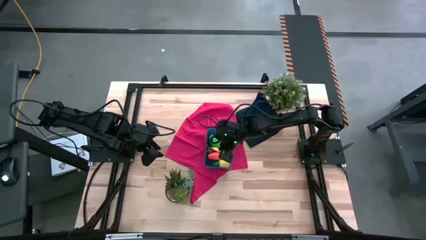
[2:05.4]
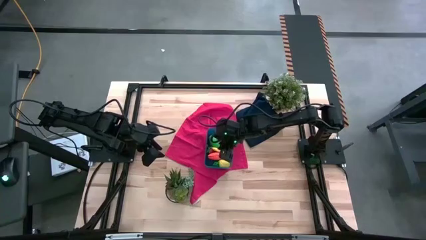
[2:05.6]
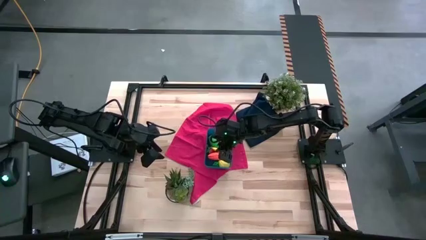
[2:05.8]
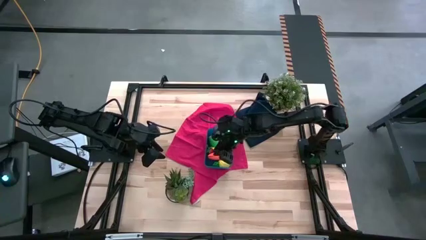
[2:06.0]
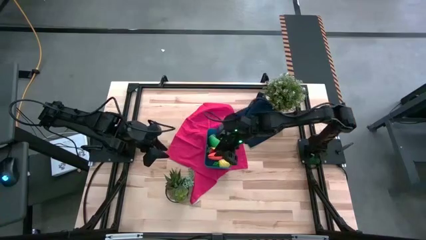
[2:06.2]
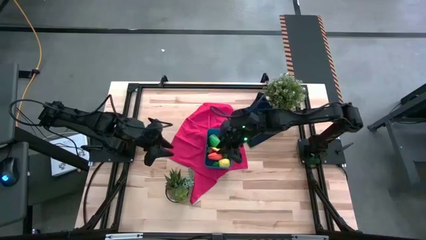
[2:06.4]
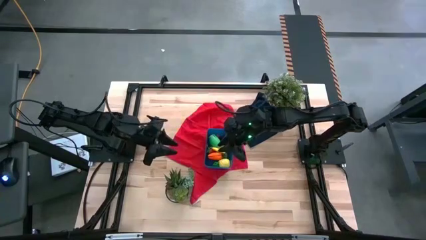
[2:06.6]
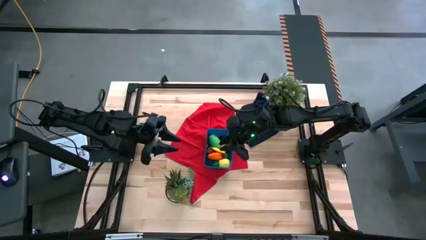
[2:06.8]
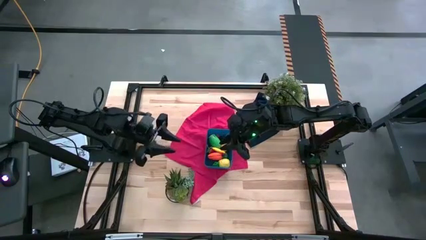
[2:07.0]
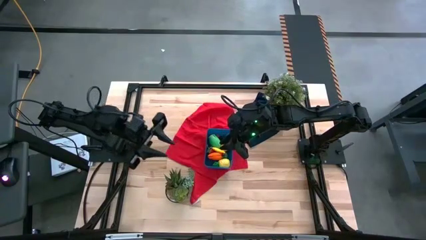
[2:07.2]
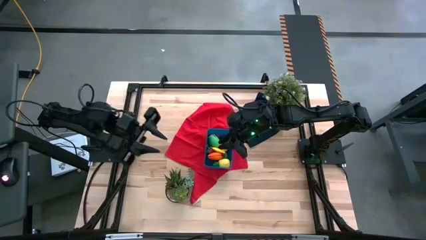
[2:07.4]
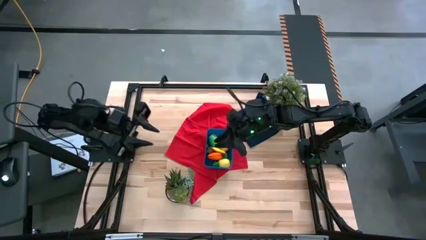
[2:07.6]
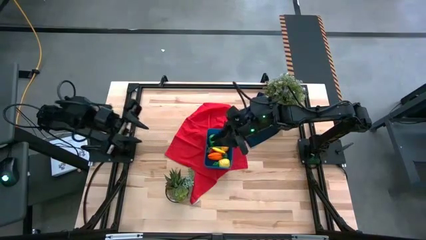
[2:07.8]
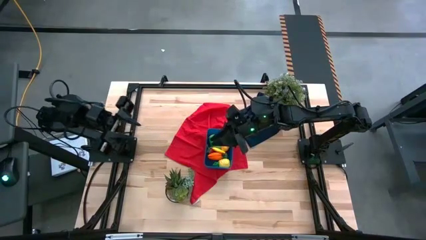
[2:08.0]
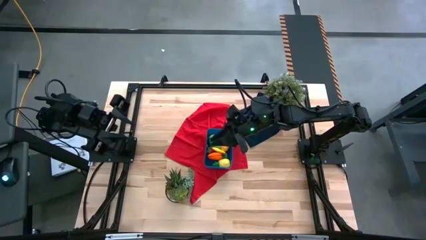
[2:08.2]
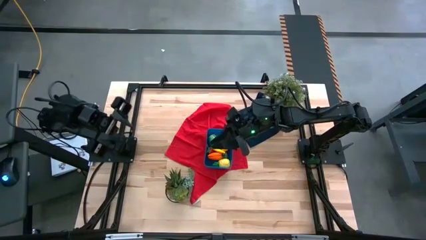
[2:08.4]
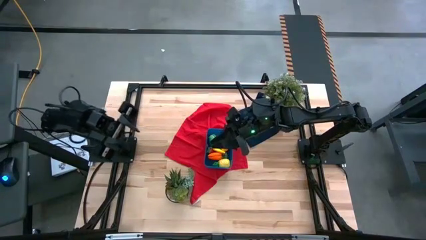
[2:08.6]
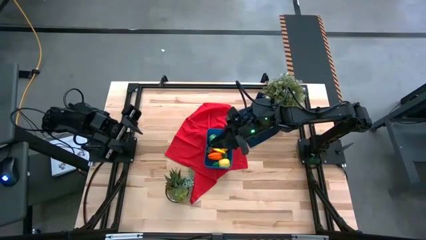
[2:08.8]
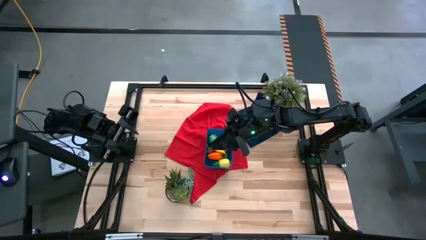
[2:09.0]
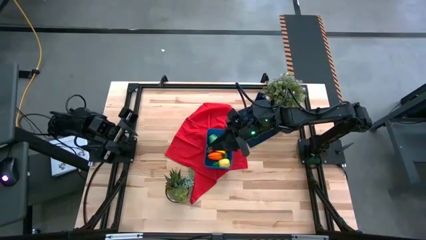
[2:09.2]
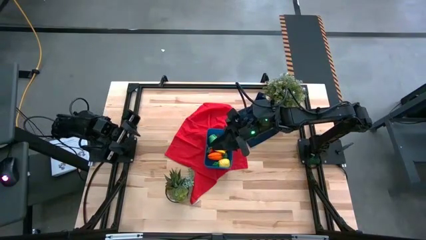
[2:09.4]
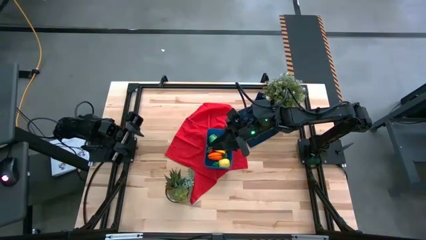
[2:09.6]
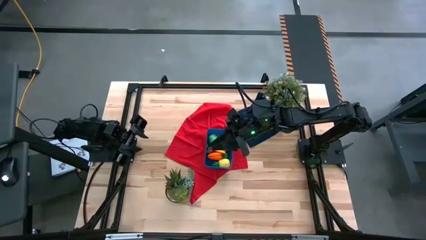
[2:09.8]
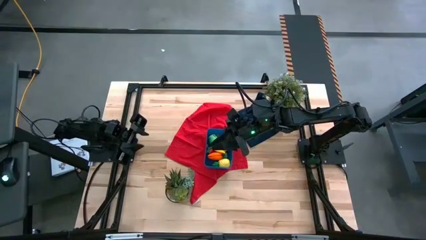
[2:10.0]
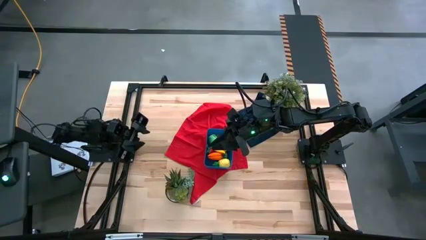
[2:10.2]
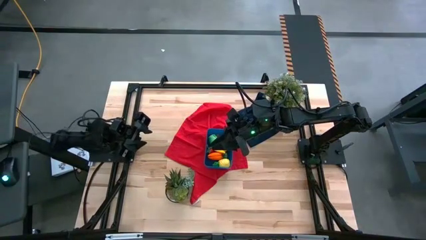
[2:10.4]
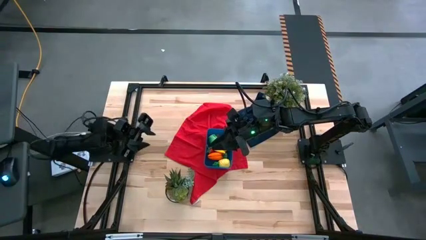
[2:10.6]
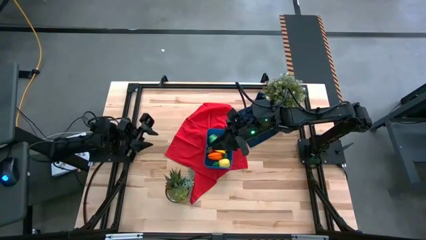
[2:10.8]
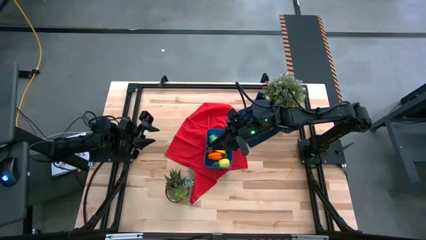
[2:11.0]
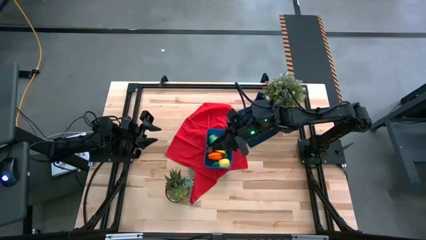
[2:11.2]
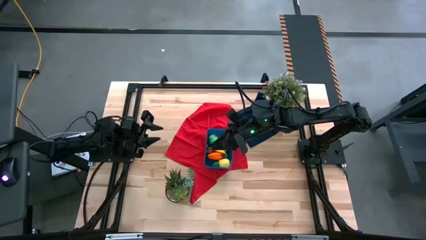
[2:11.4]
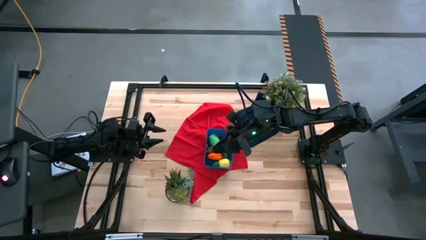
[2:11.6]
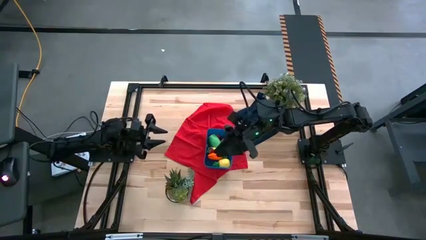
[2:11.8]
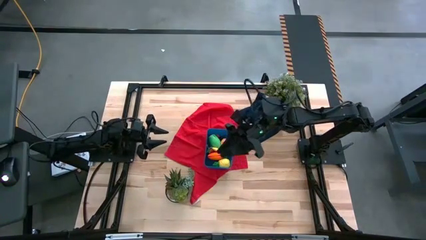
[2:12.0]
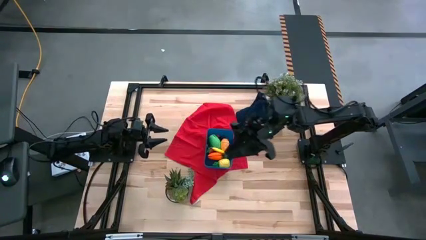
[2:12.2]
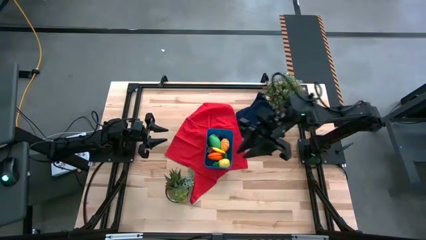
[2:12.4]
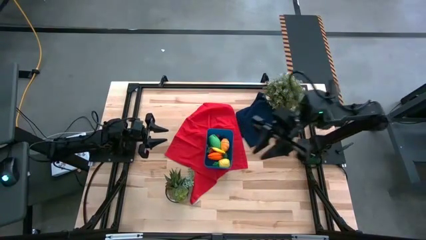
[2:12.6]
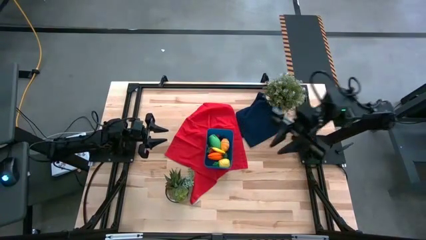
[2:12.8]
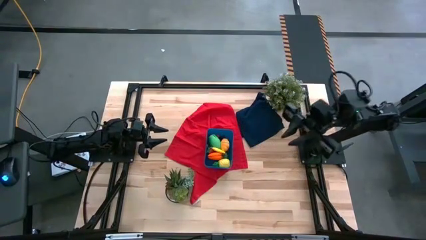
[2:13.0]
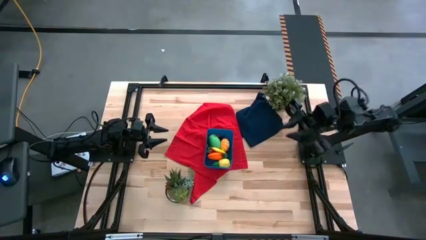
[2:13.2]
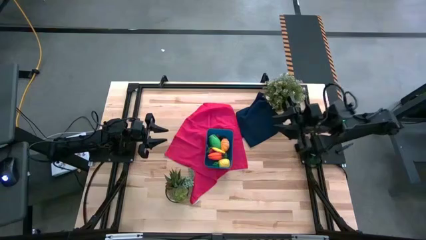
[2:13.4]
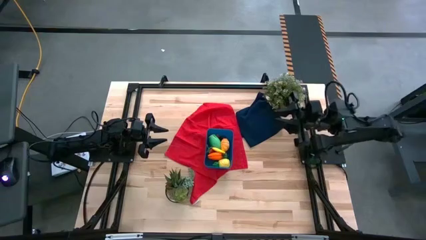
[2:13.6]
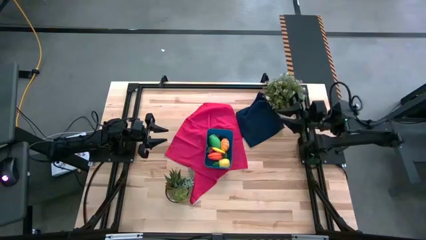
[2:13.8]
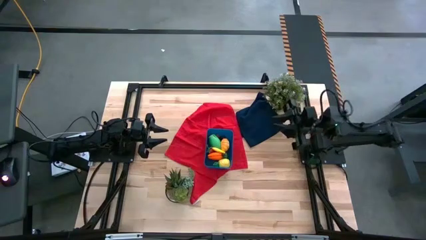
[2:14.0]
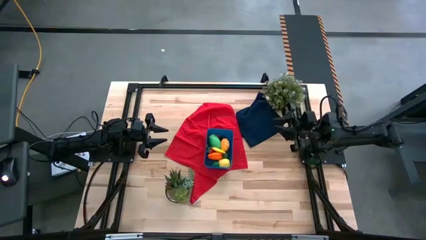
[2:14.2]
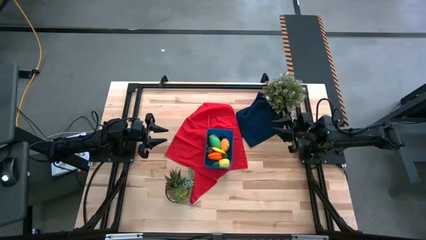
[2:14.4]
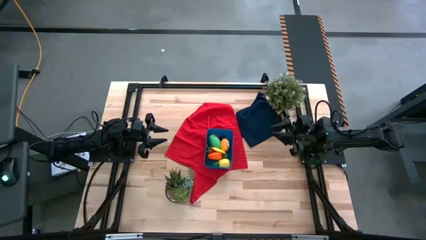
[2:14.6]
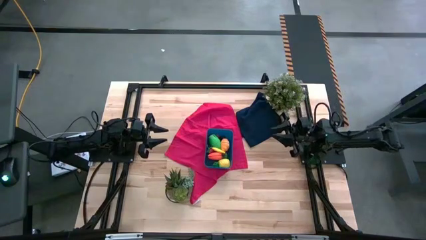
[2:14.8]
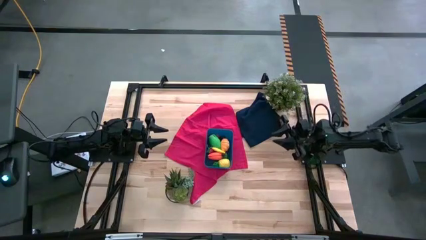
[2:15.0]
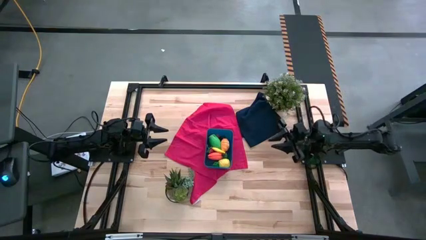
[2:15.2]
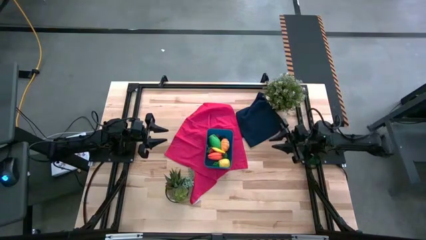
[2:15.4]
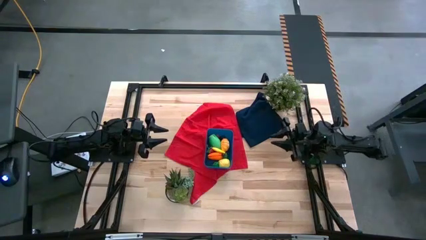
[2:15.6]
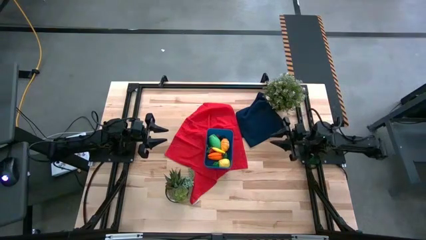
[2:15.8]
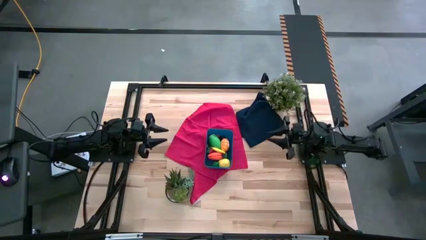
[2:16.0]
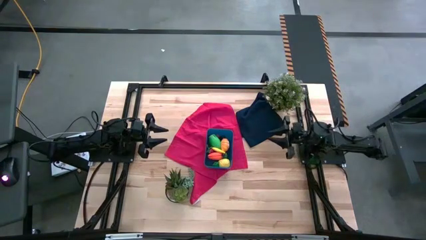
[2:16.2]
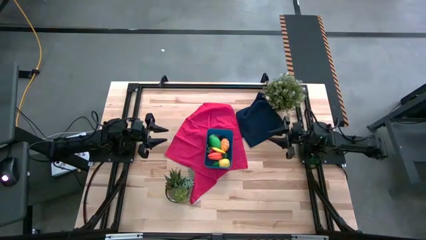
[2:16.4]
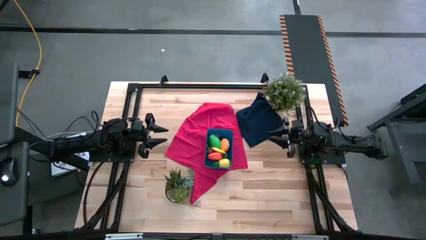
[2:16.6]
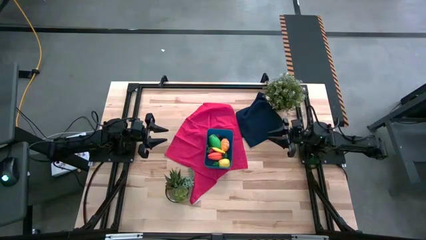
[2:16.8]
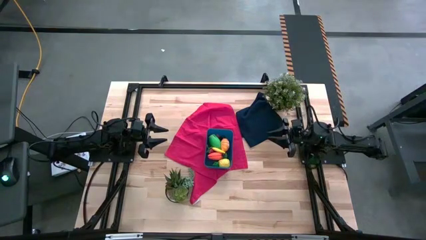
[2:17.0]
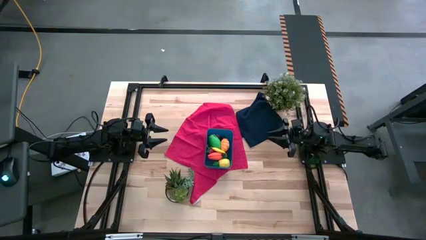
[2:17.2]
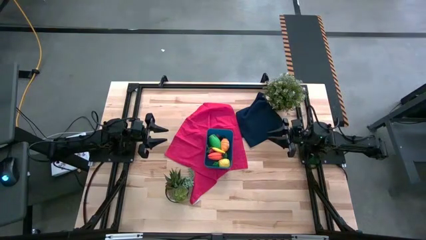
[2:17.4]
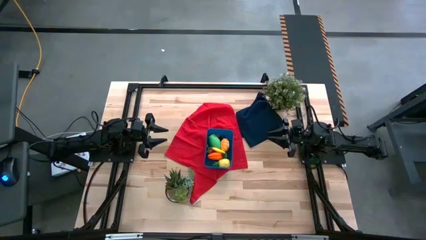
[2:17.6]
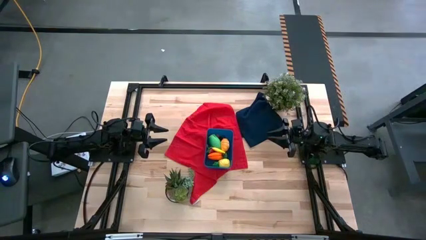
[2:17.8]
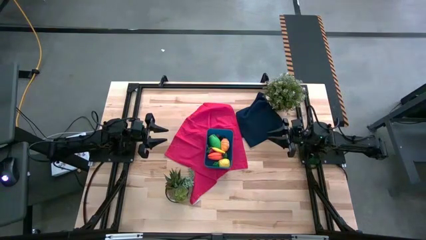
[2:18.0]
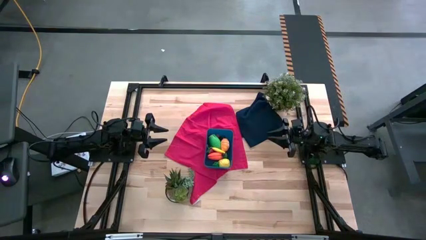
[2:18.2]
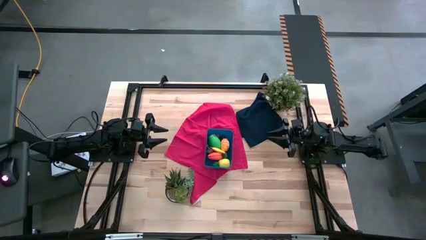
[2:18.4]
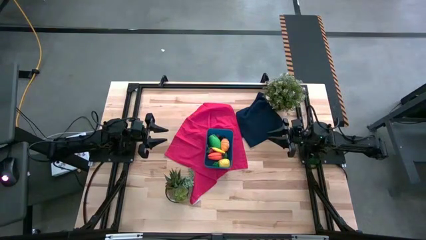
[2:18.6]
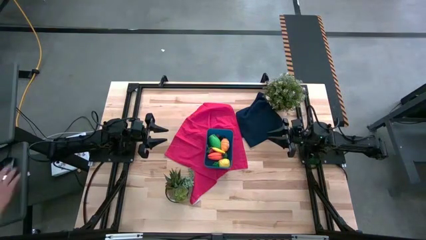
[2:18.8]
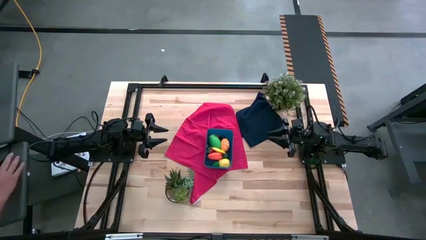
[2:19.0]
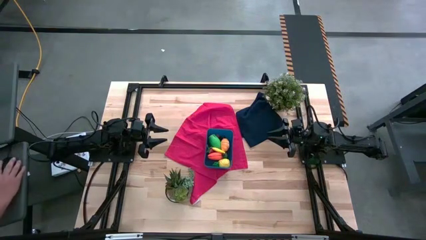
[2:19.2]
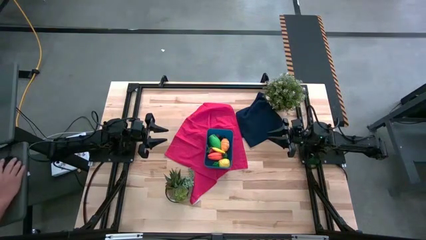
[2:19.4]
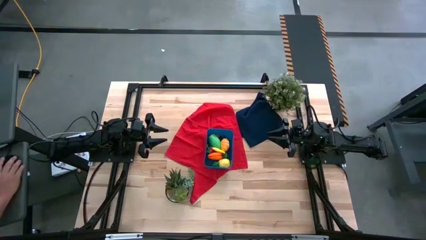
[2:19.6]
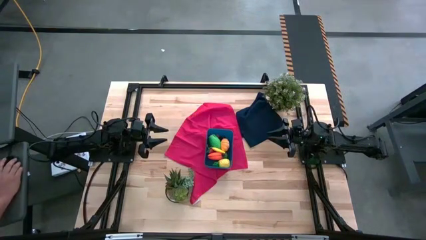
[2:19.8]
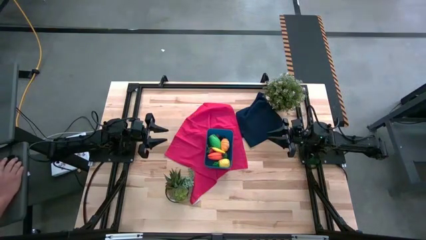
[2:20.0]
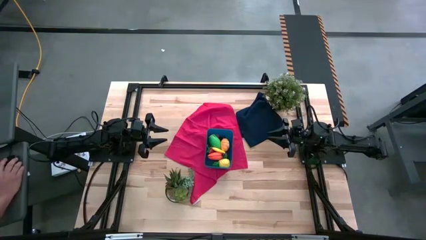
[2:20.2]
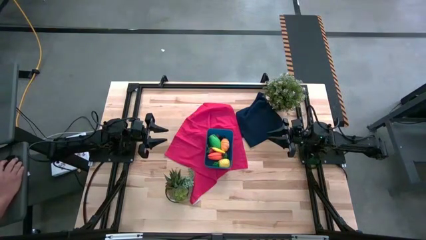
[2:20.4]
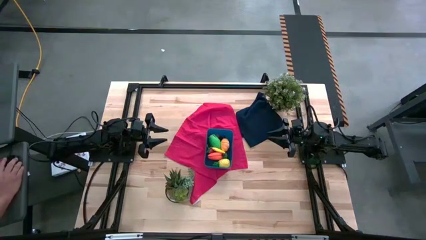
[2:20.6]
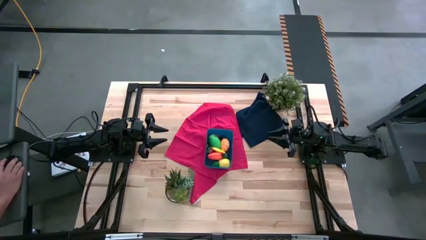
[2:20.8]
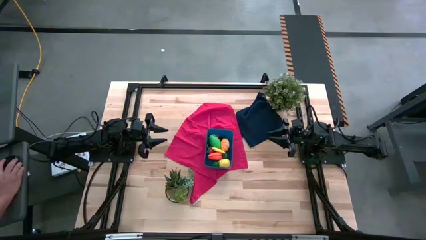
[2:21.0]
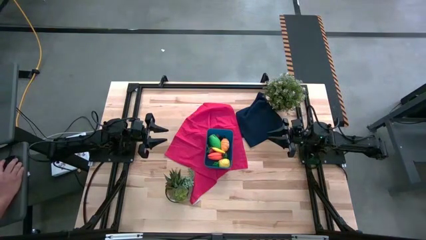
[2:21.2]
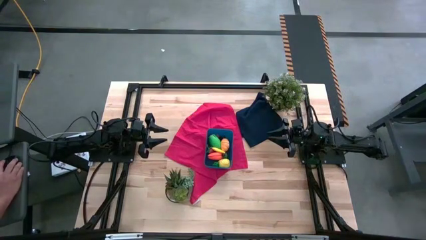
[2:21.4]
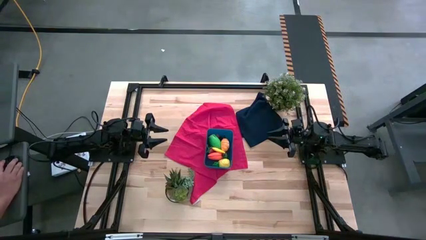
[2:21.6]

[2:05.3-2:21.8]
Task: Pick and placing Produce into tupperware
Return to Home Position

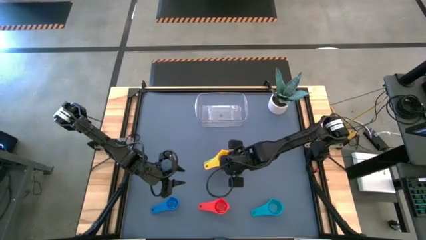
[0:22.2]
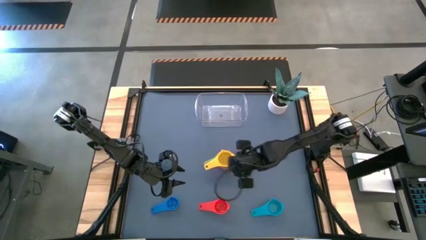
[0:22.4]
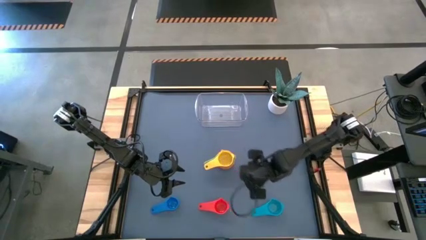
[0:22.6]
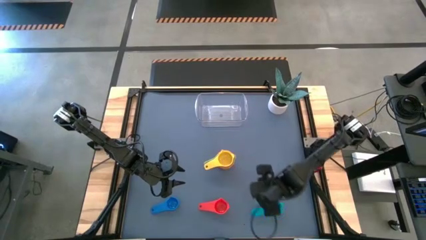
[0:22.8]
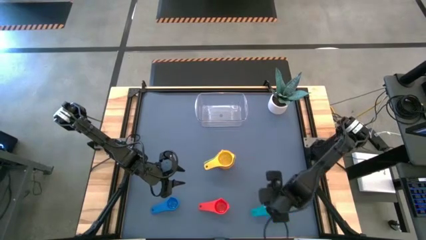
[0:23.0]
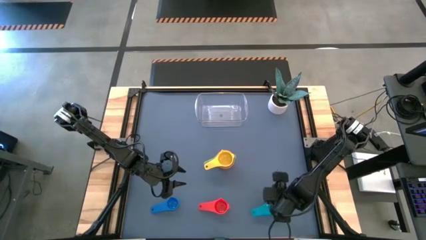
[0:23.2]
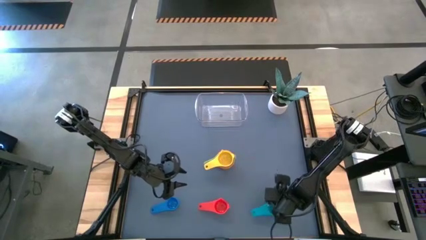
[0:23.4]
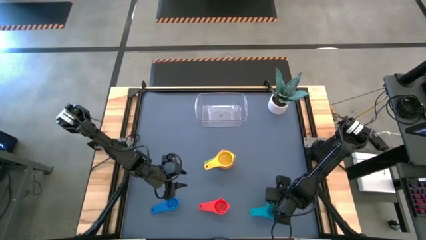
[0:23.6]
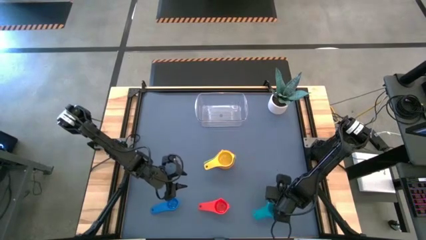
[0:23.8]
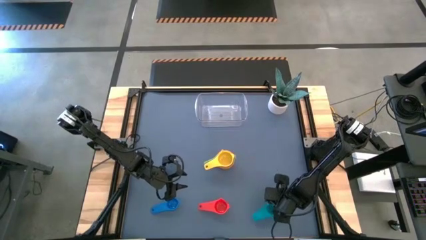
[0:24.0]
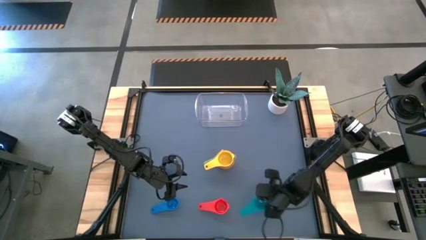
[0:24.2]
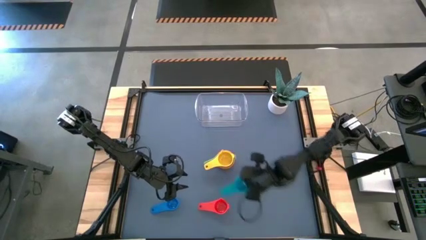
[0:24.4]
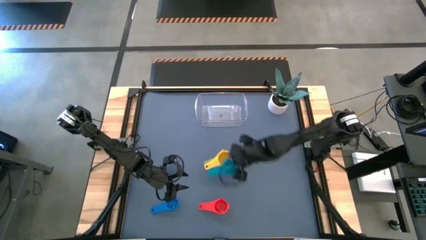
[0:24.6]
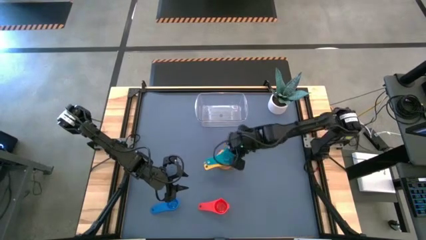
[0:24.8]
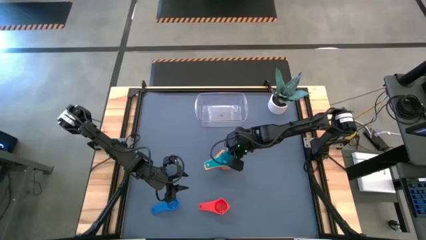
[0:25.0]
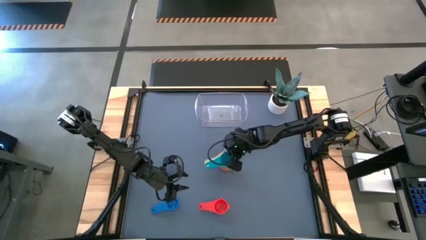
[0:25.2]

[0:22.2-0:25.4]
Task: Nest measuring cups in basket
Stack the light blue measuring cup on top of the yellow measuring cup
